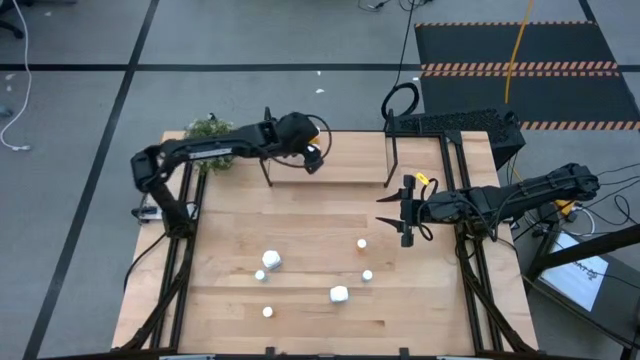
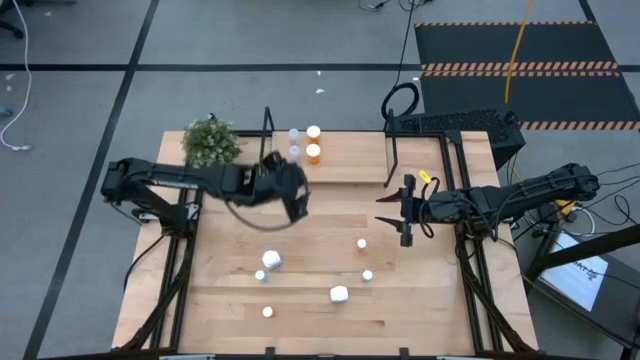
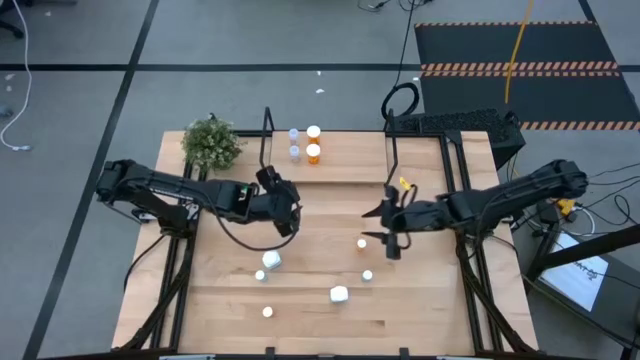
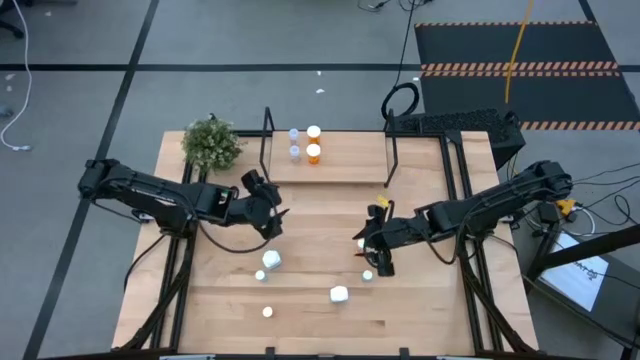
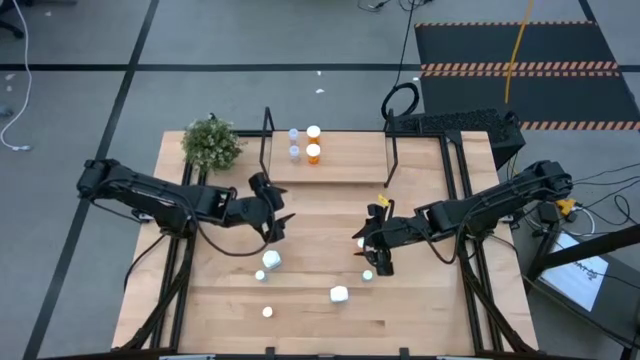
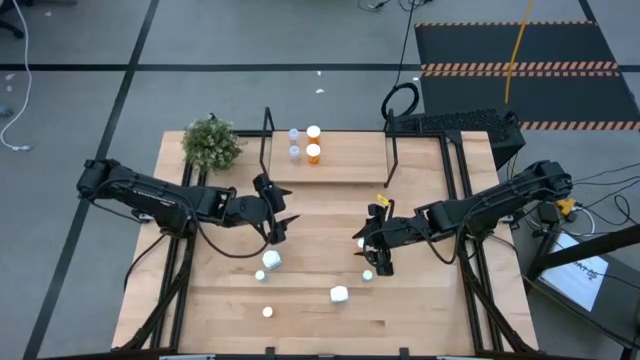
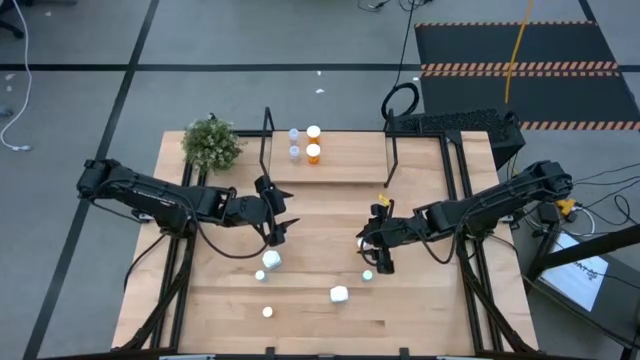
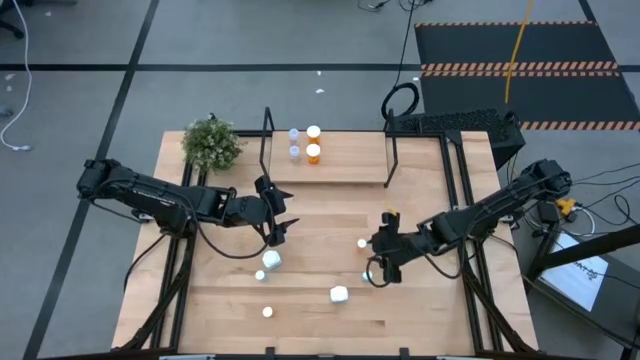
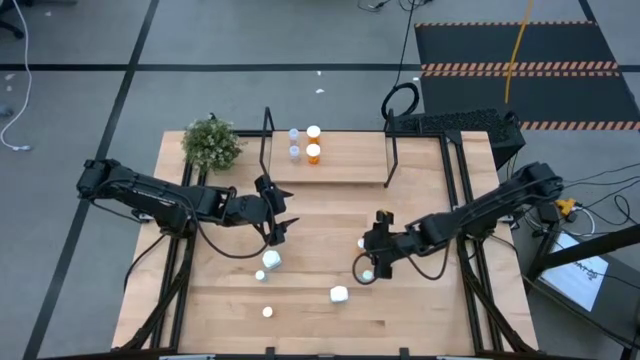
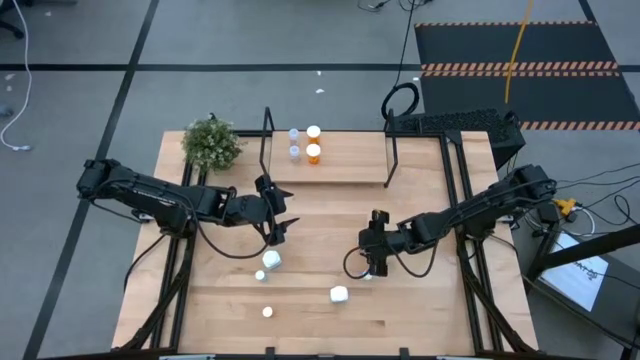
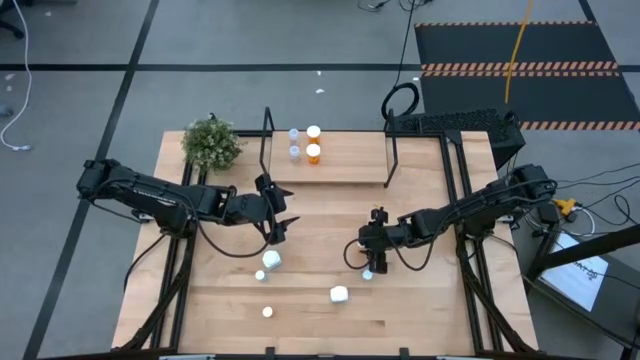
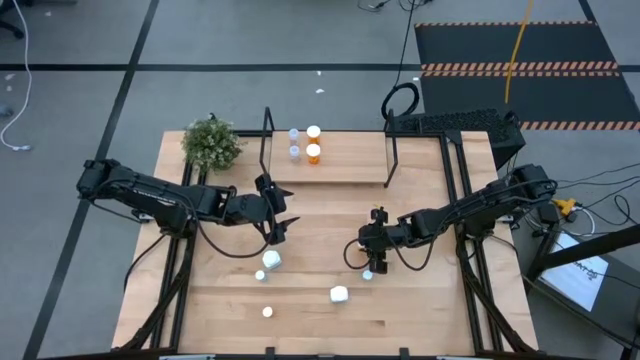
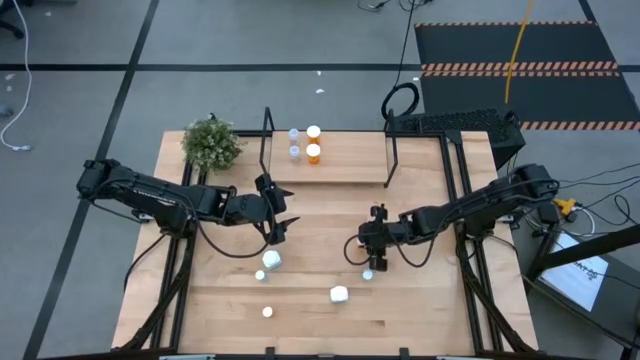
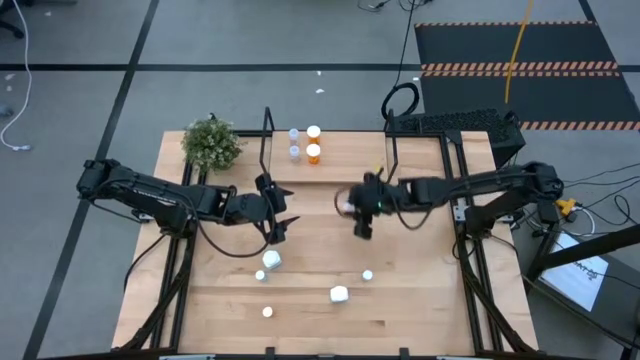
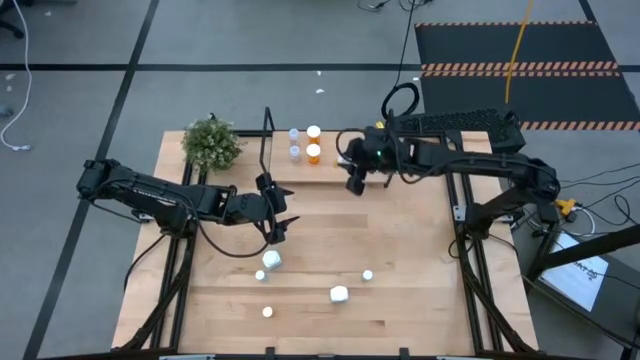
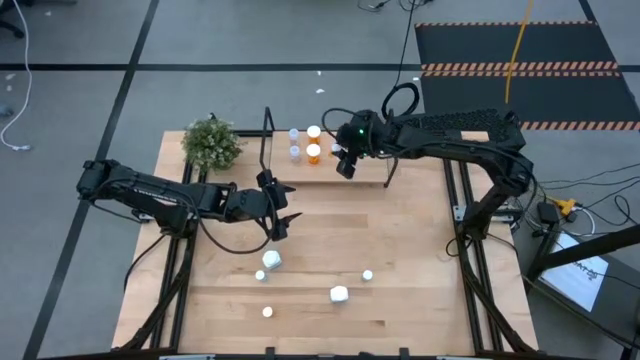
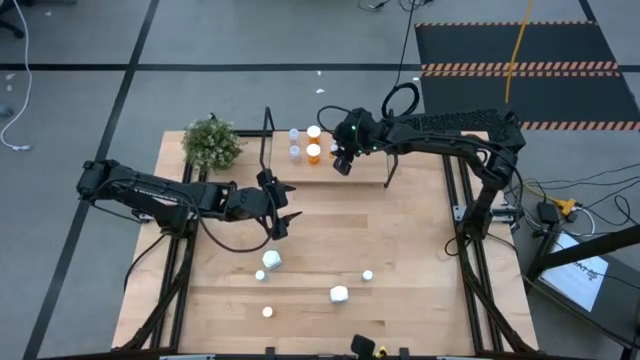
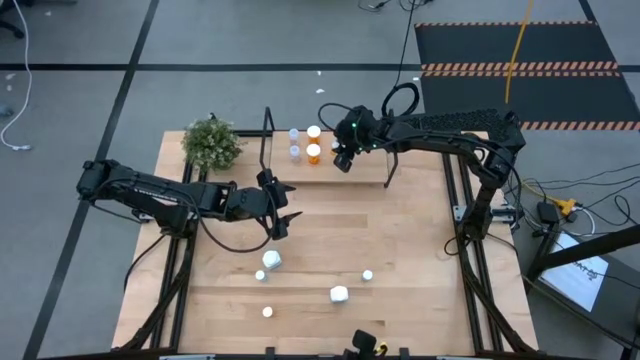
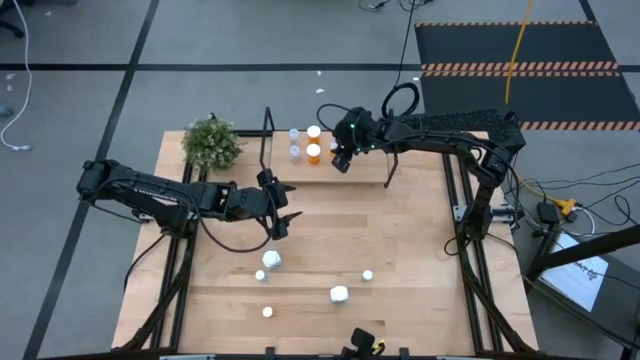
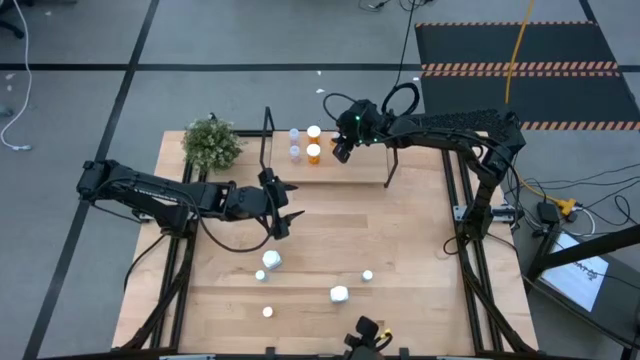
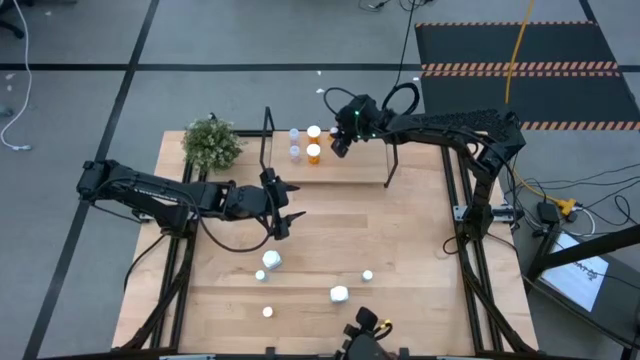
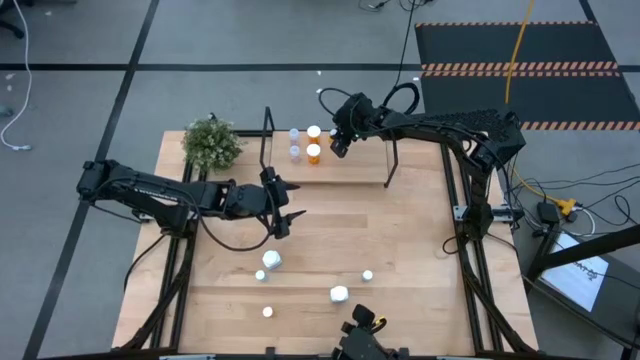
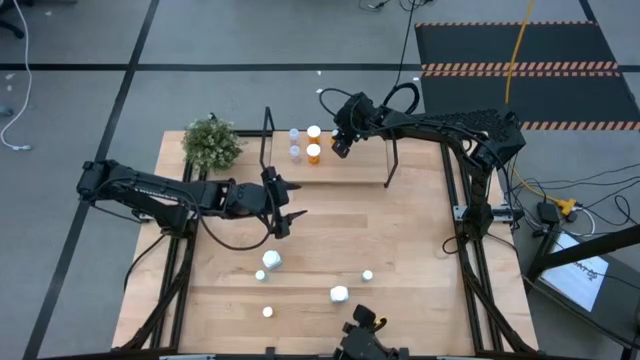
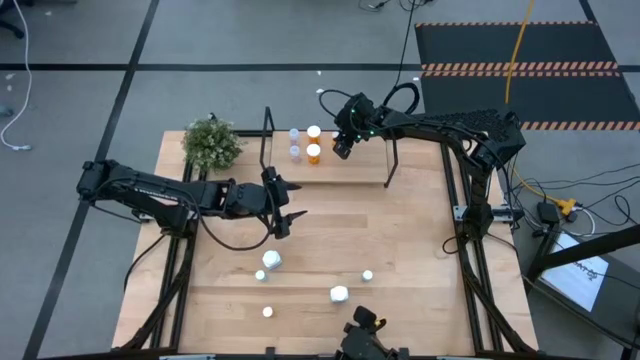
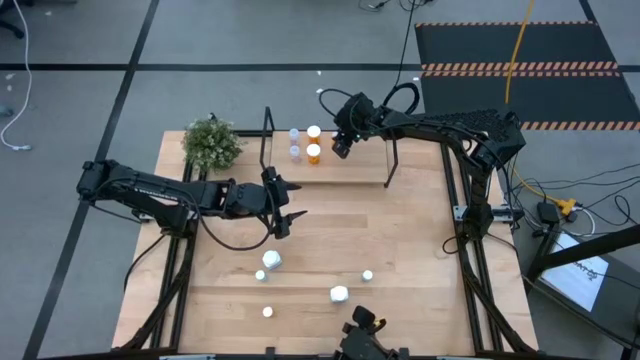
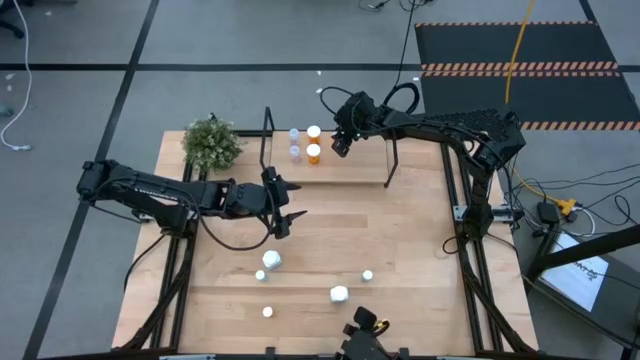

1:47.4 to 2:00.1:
Task: Pick and place medicine bottles onto shelf by color
Put the right small orange pill bottle on the shelf

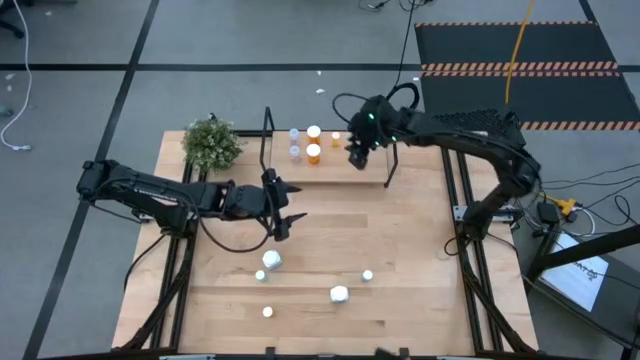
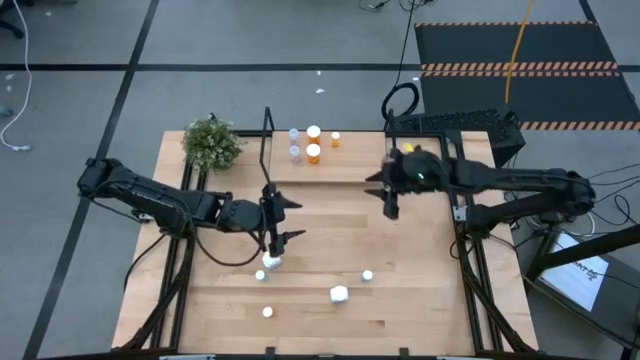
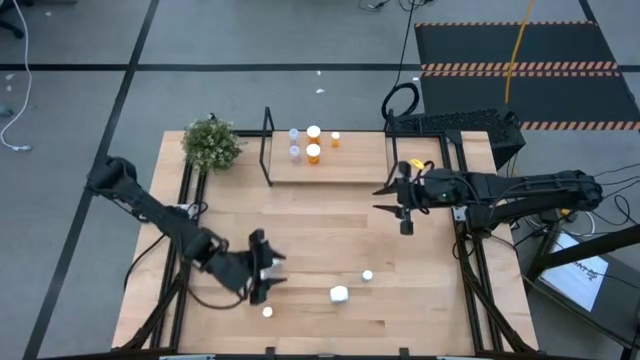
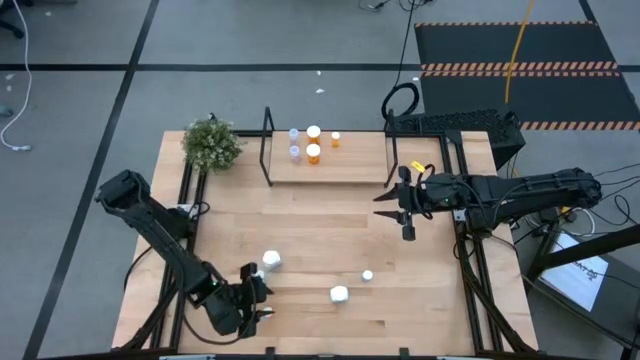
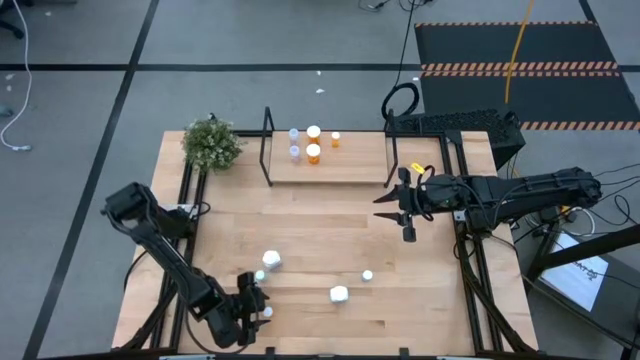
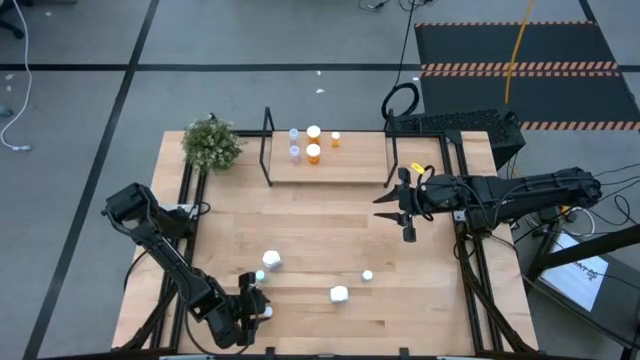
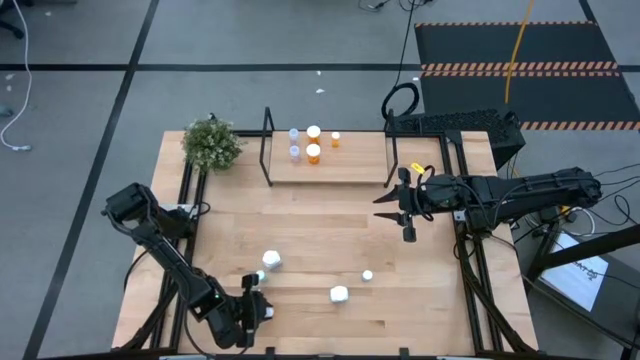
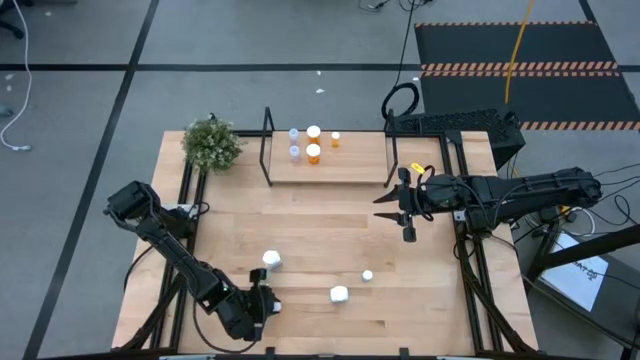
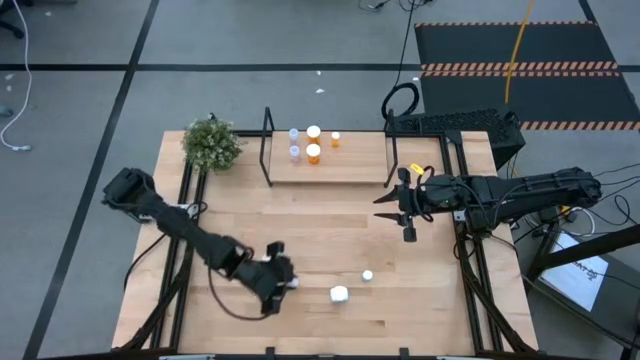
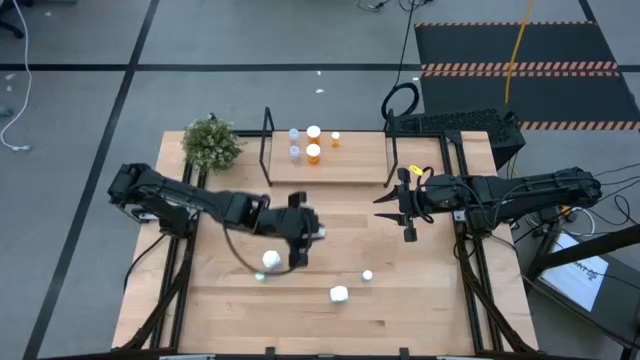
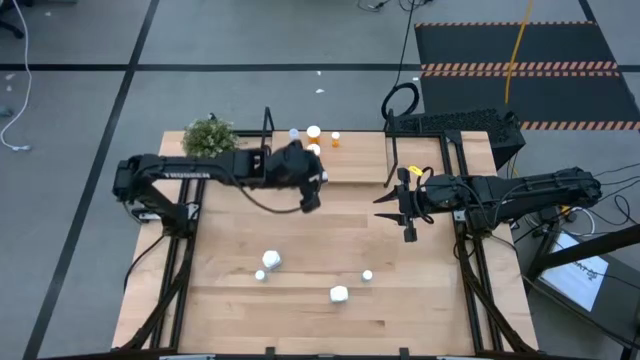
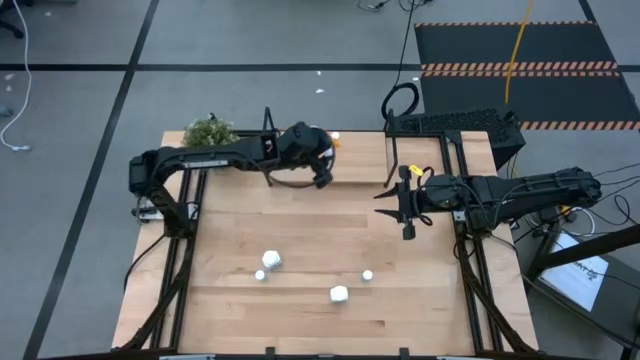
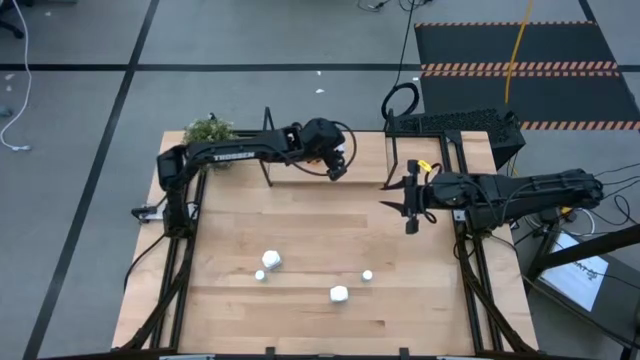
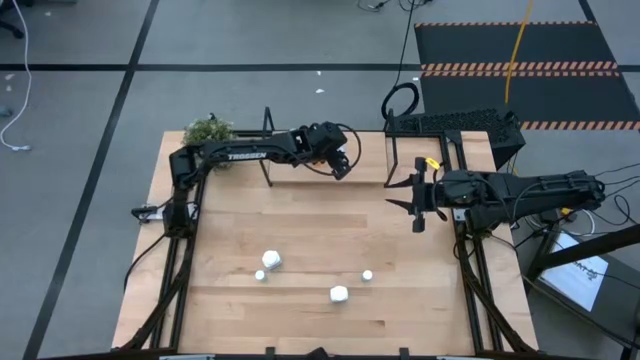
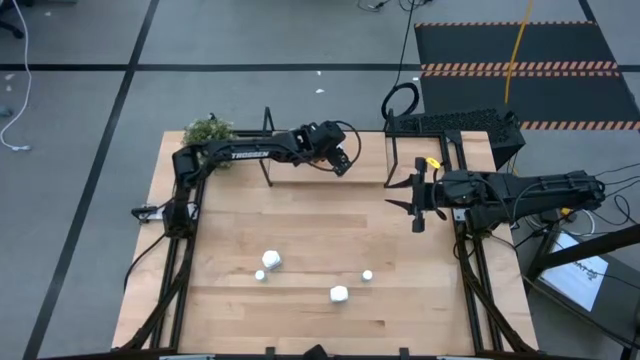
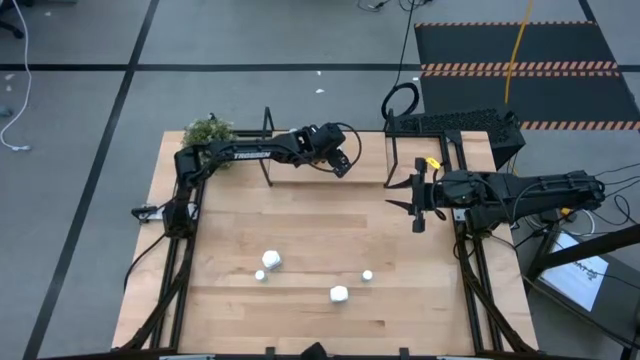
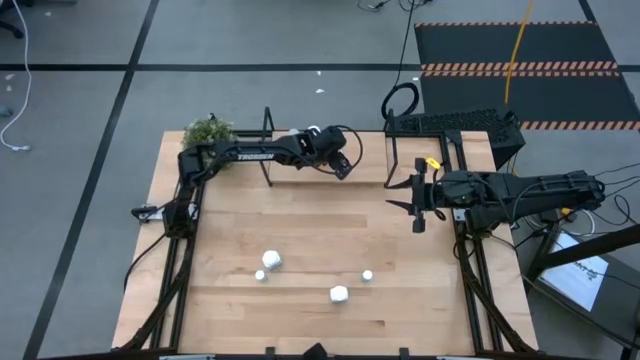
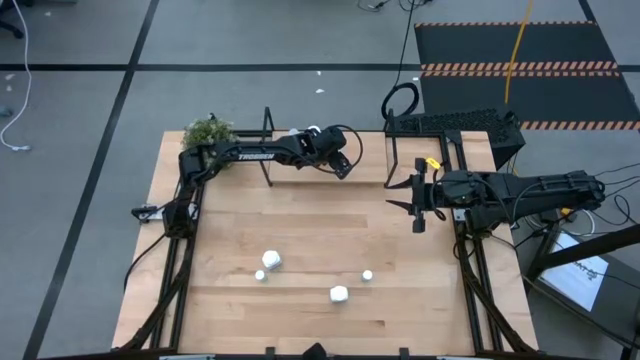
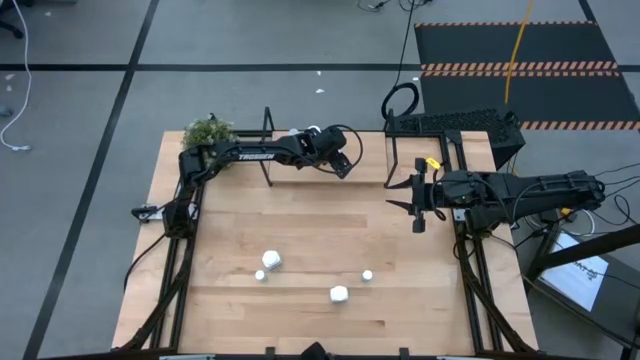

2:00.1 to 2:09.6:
Put the small orange pill bottle on the shelf aligned with the other small orange pill bottle
